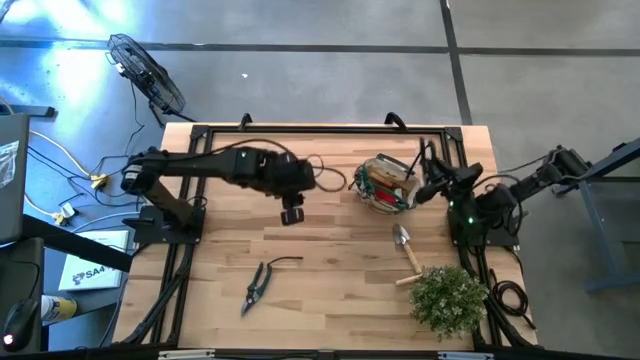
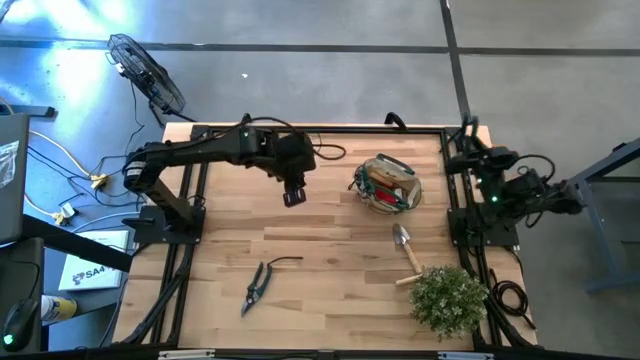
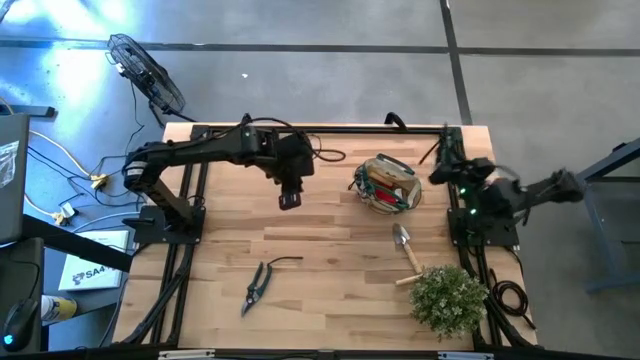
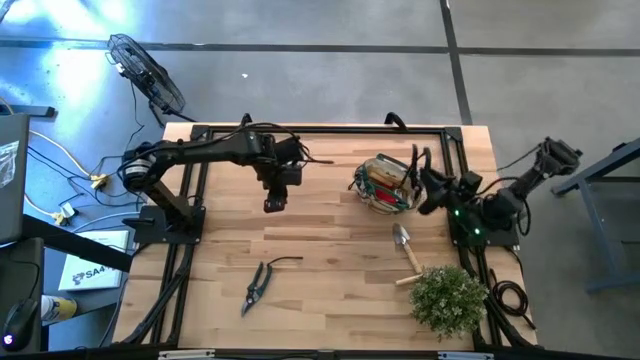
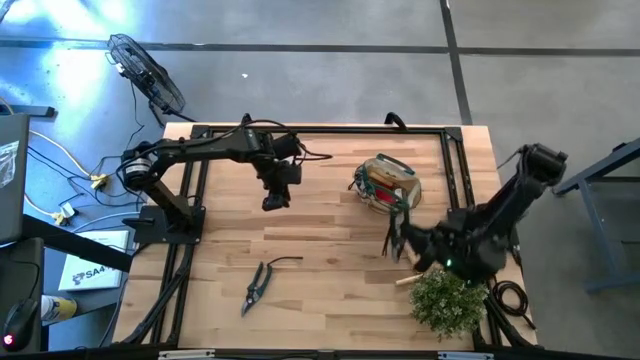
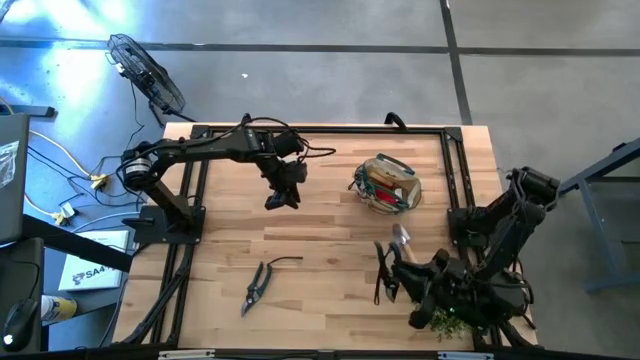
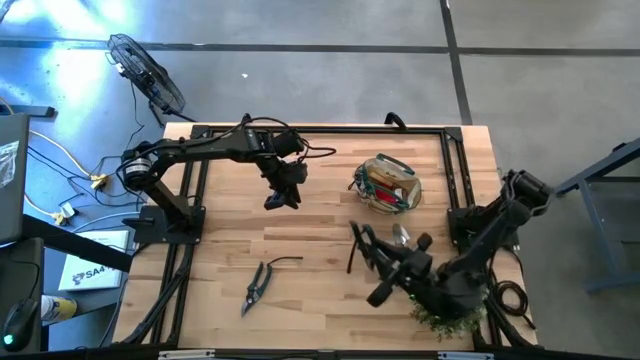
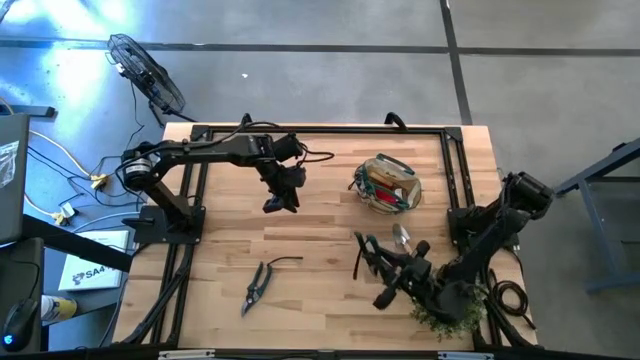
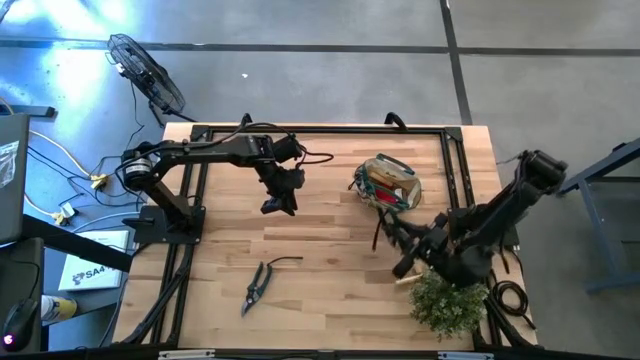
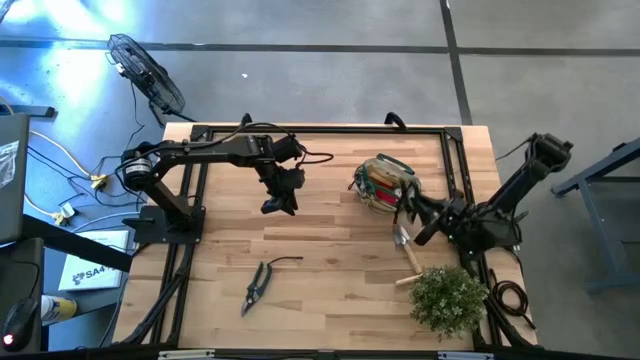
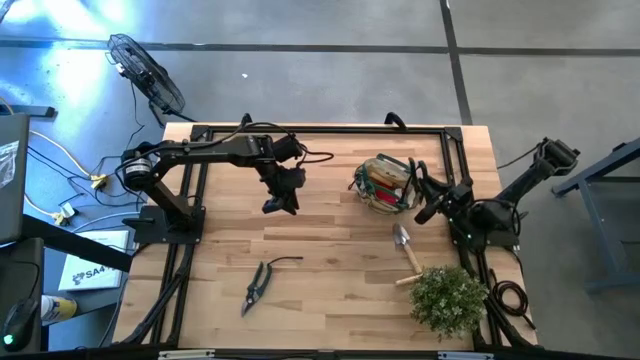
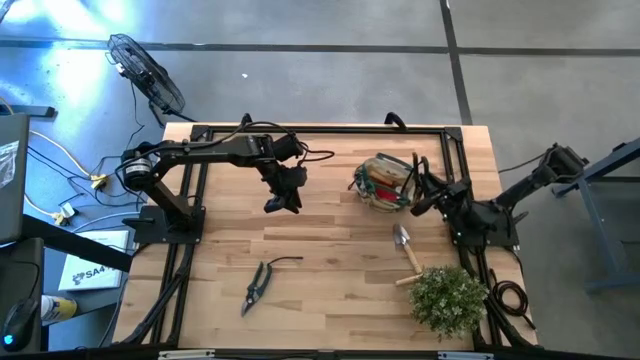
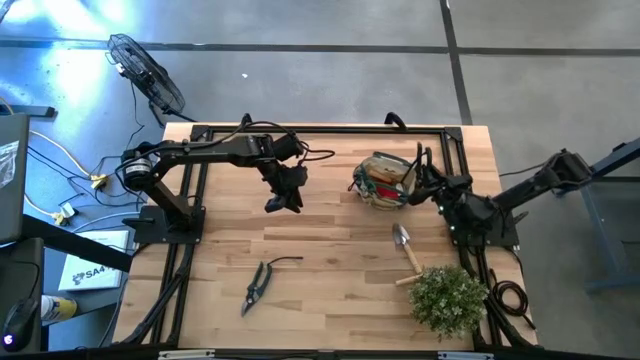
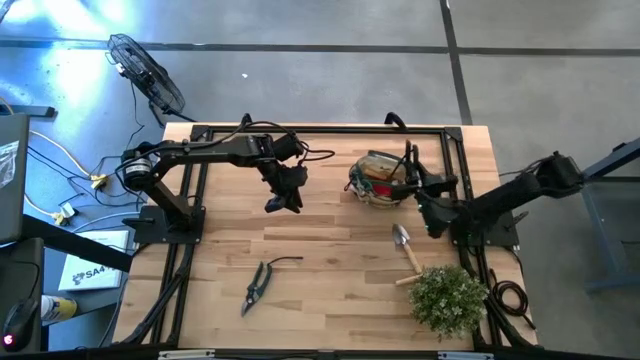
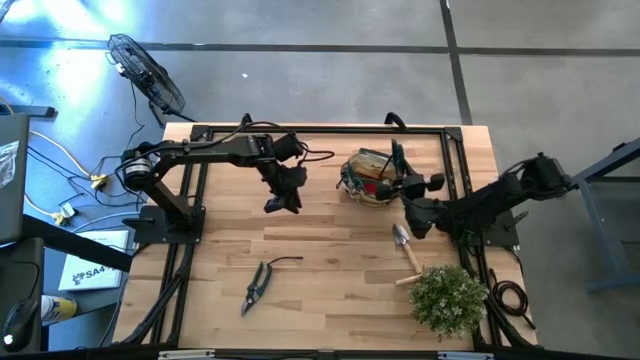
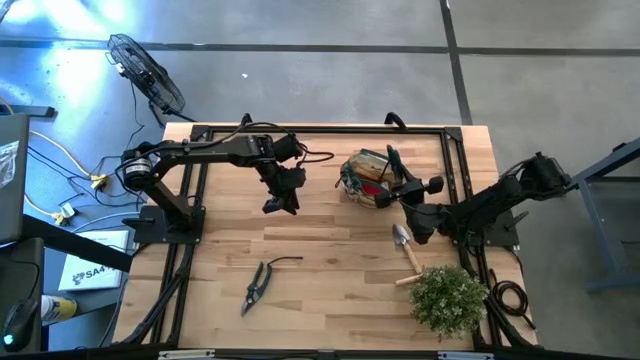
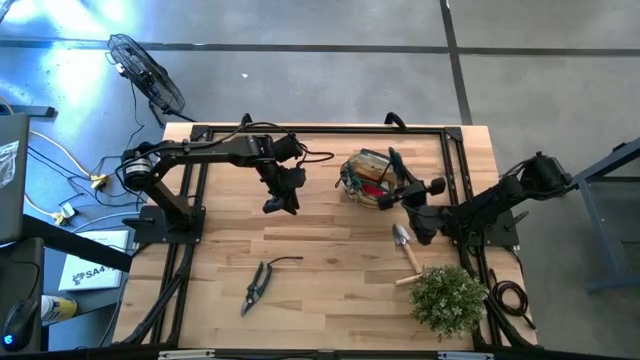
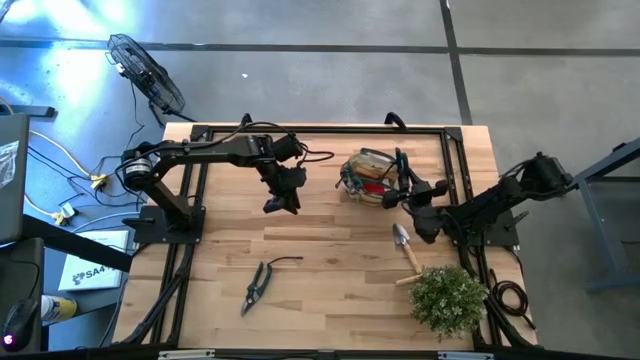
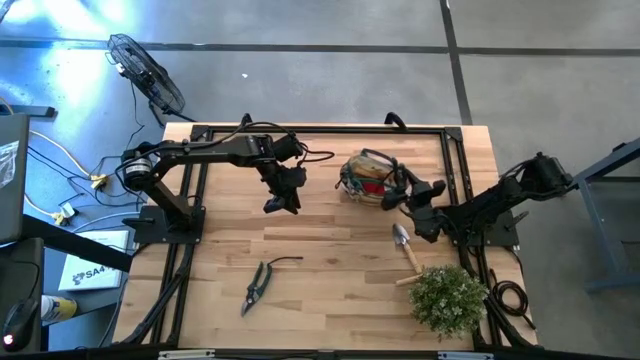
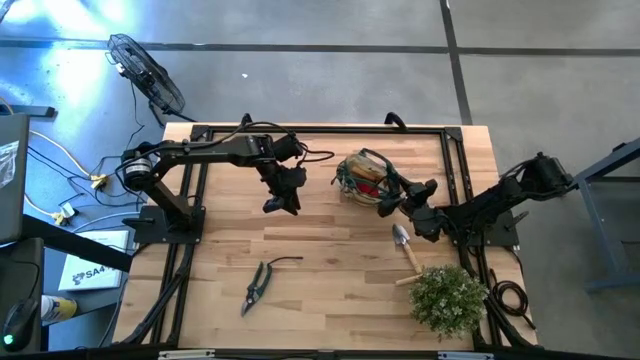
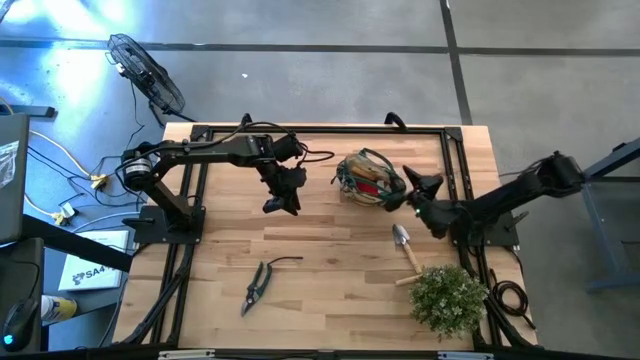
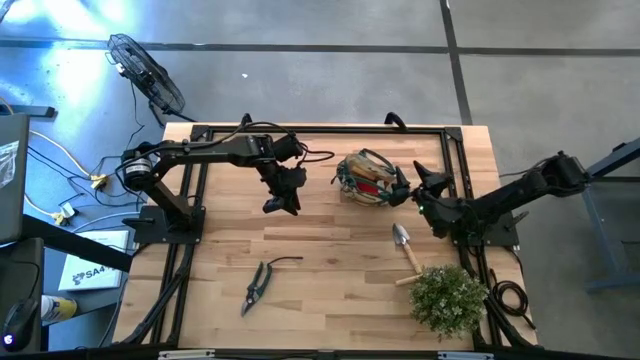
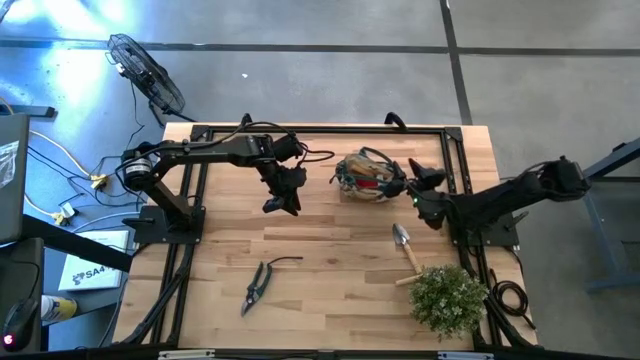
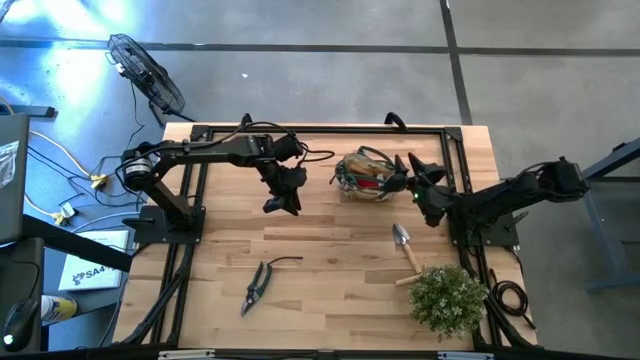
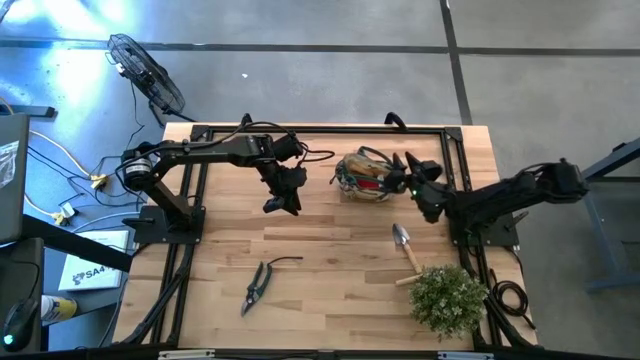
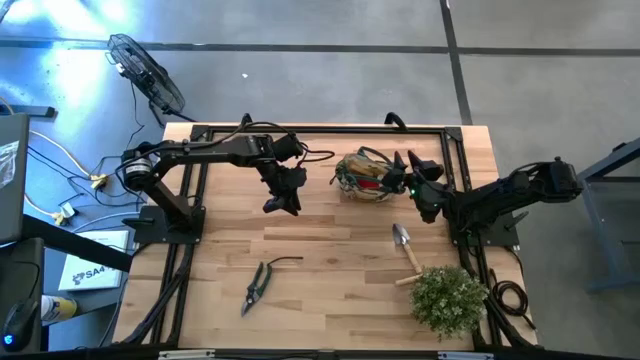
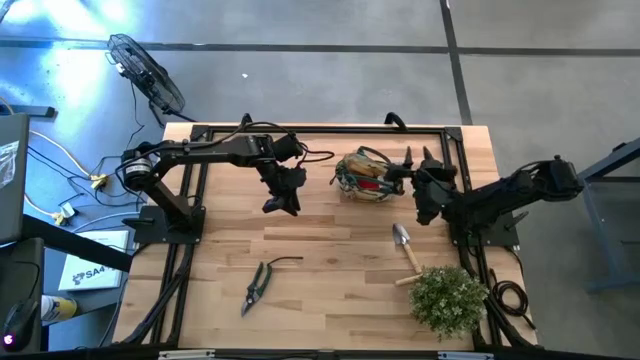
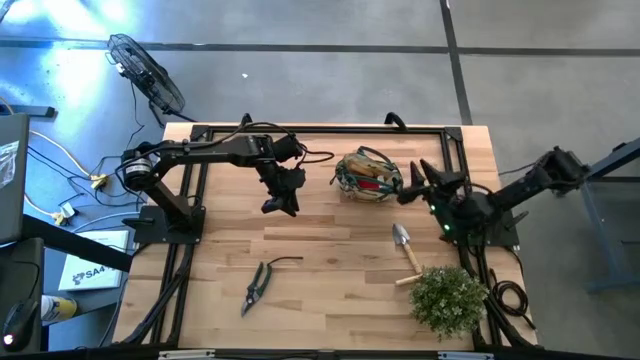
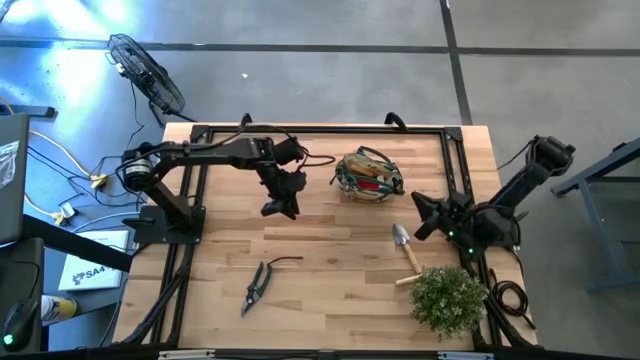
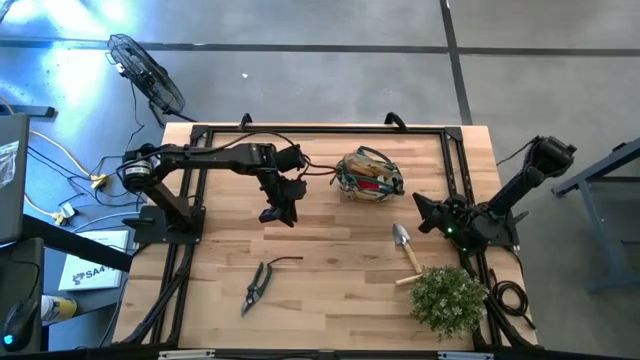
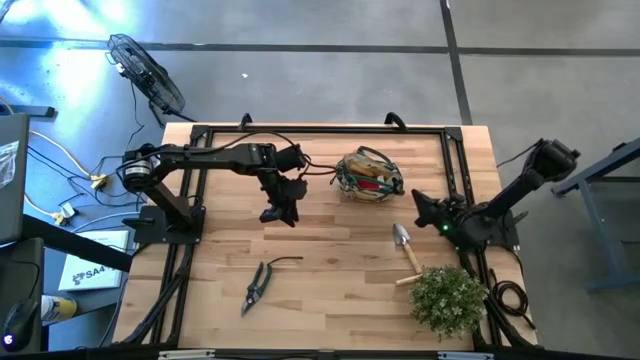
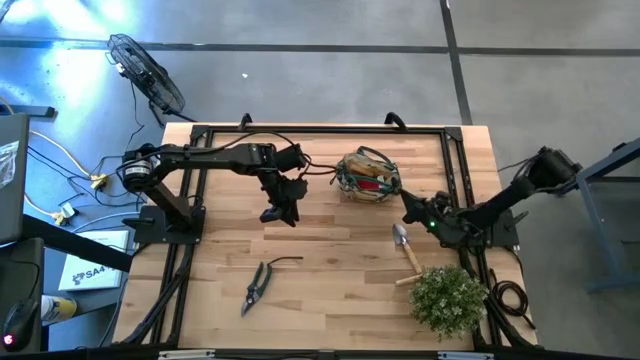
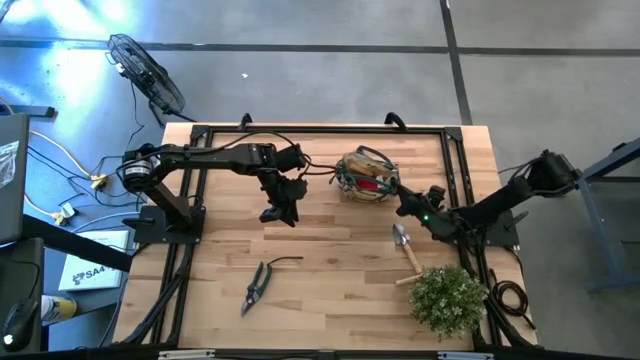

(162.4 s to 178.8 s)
Task: Pick & Place Garden tools in Gardening bag
Put the top green shear scissors into the light brown gardening bag

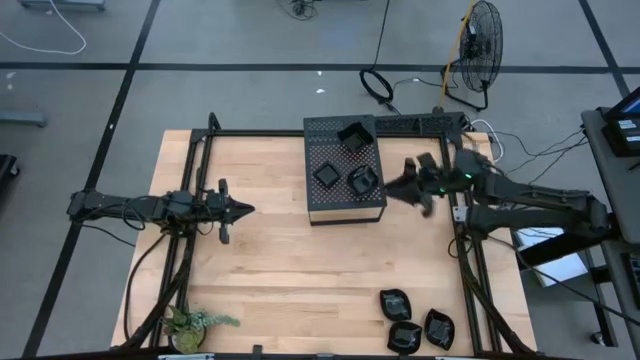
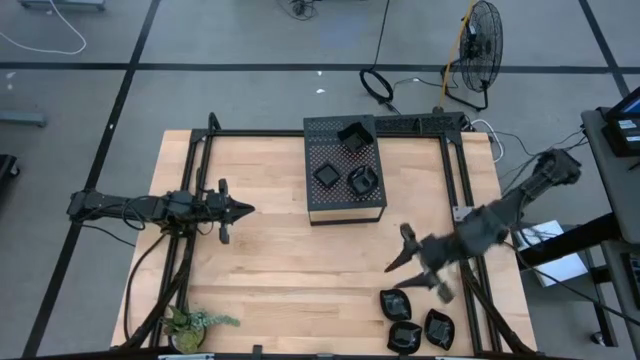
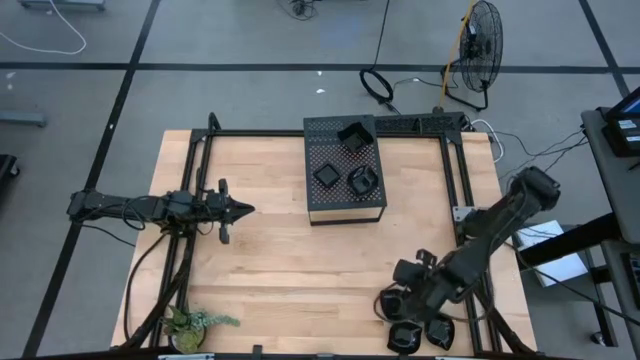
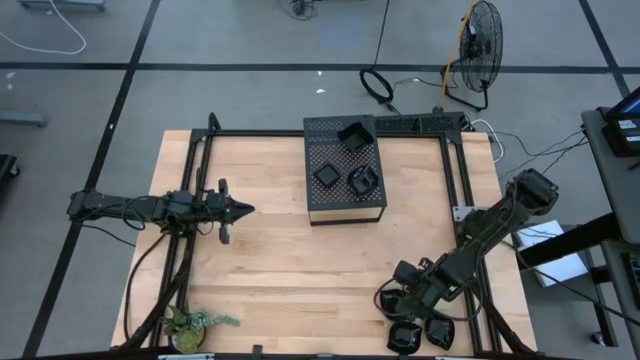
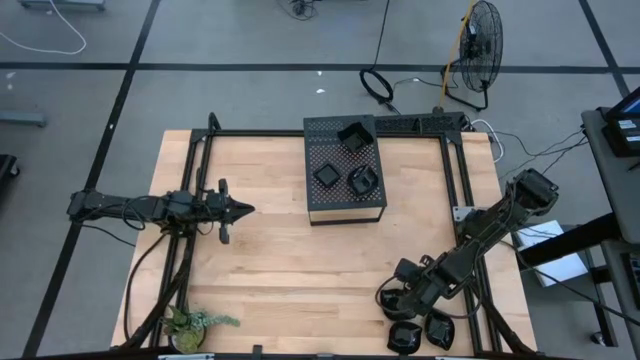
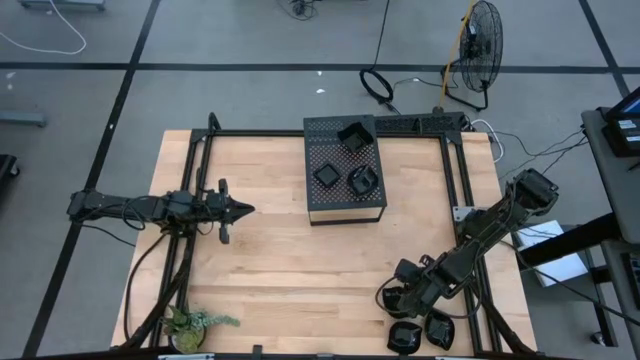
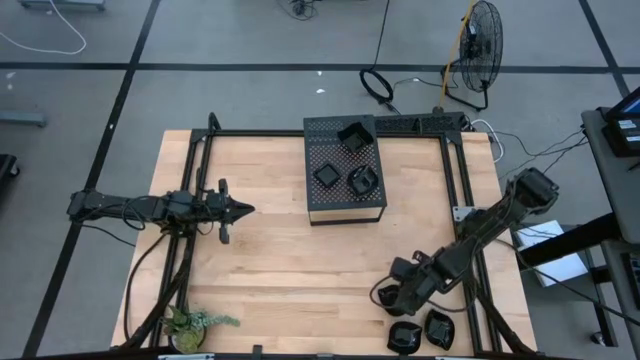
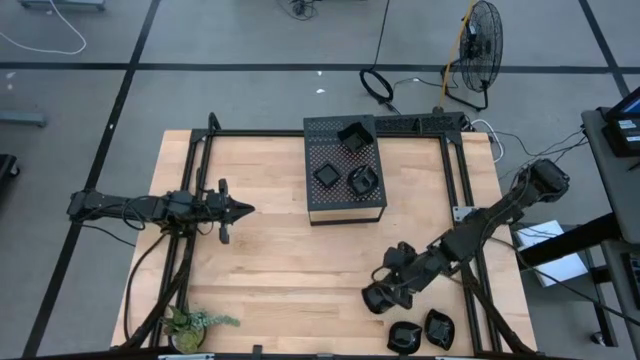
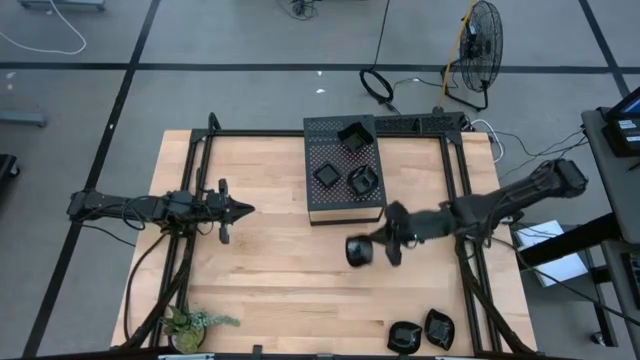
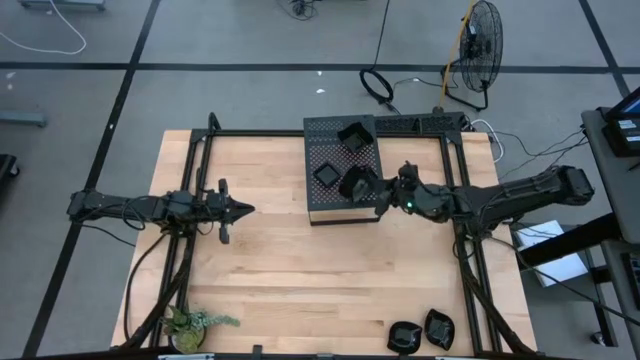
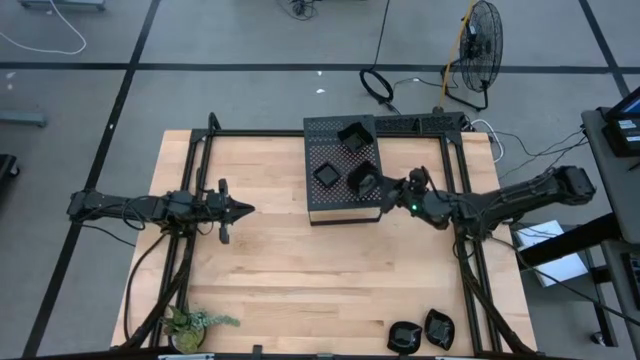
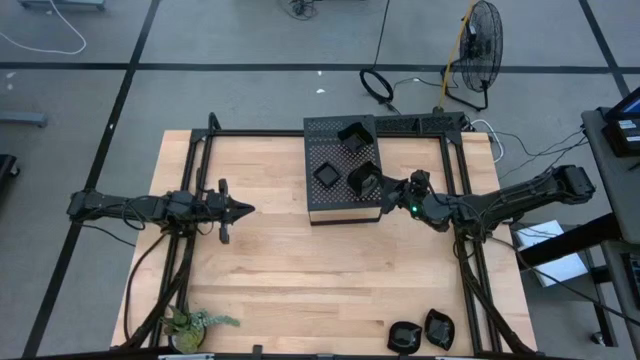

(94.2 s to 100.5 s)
Task: Pick & Place Mini shaped plates
Stack the leaf shaped plate on top of the leaf shaped plate on the shelf
